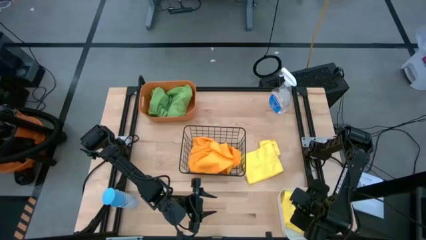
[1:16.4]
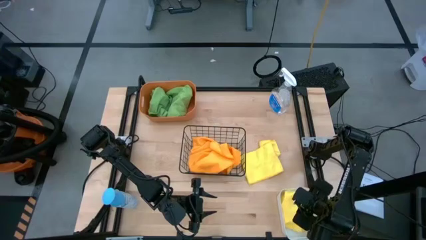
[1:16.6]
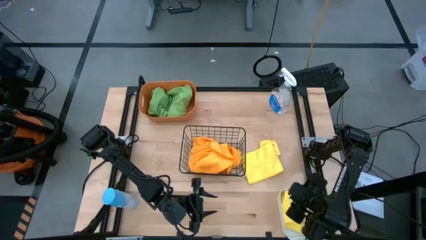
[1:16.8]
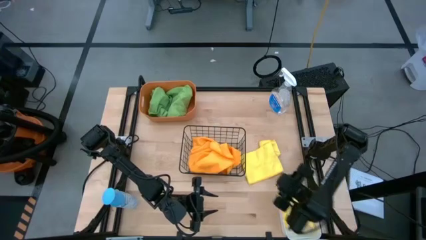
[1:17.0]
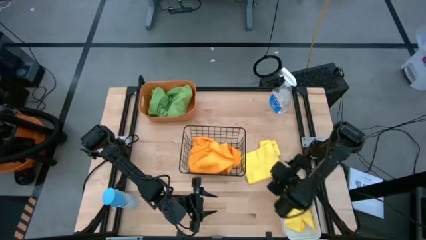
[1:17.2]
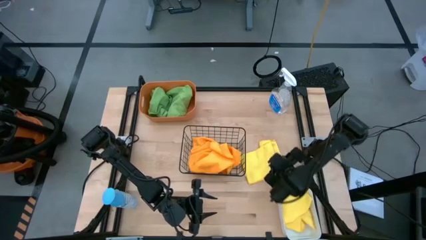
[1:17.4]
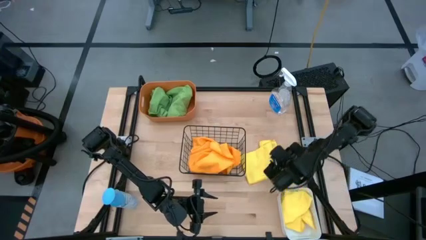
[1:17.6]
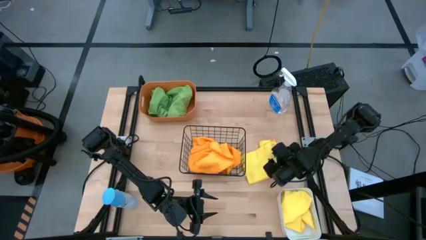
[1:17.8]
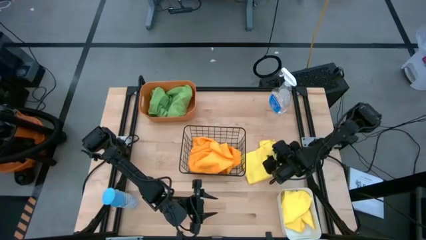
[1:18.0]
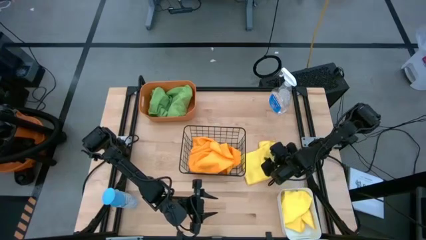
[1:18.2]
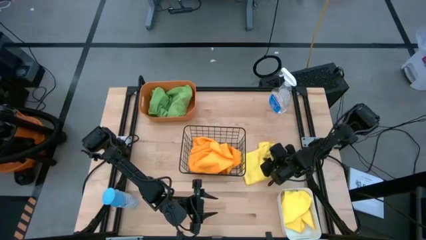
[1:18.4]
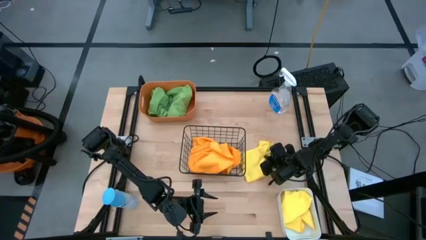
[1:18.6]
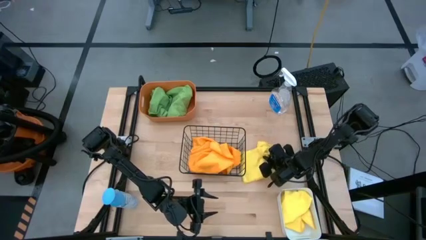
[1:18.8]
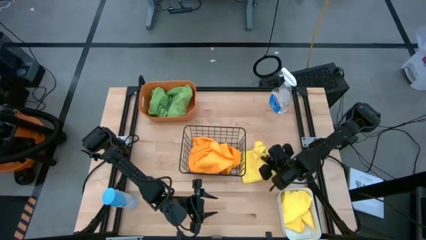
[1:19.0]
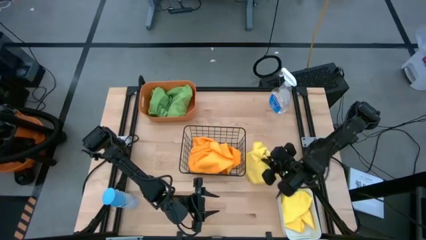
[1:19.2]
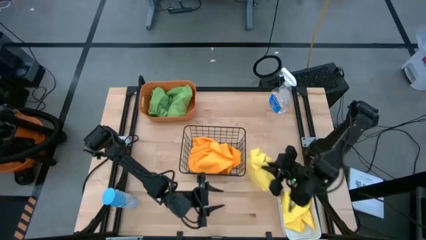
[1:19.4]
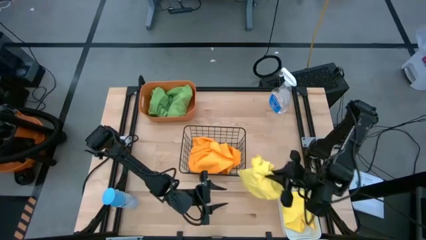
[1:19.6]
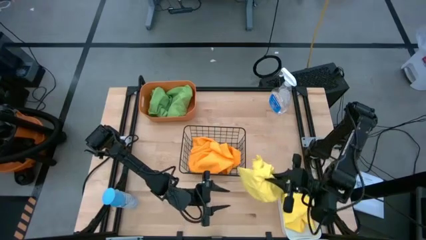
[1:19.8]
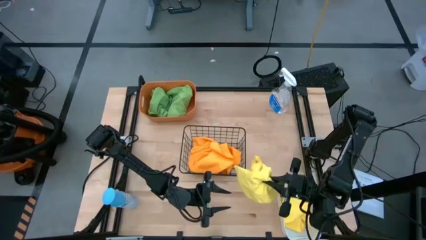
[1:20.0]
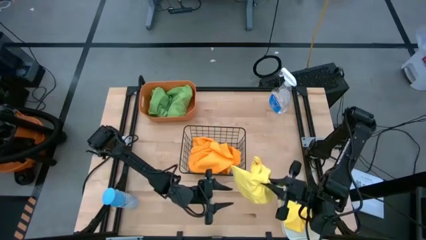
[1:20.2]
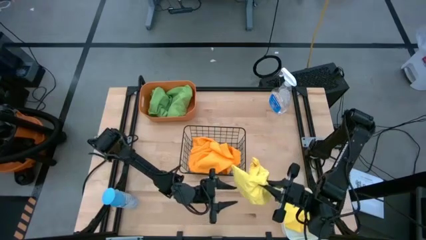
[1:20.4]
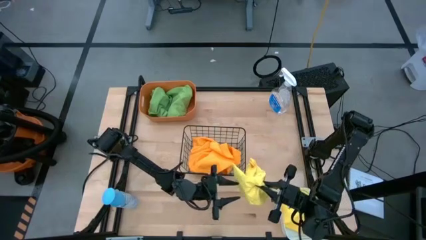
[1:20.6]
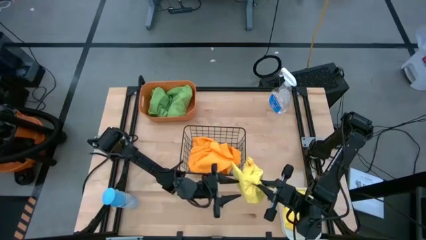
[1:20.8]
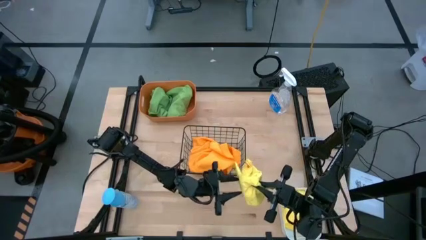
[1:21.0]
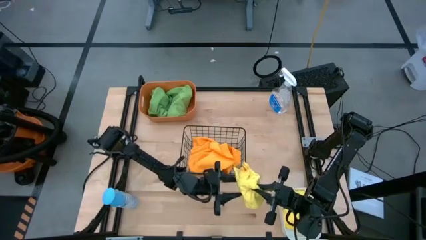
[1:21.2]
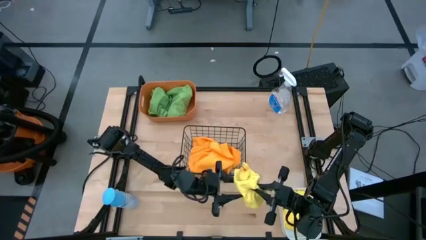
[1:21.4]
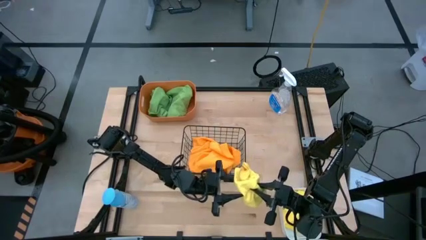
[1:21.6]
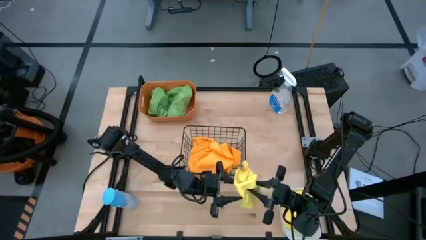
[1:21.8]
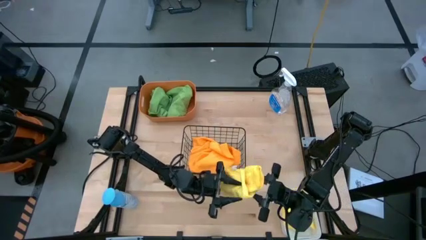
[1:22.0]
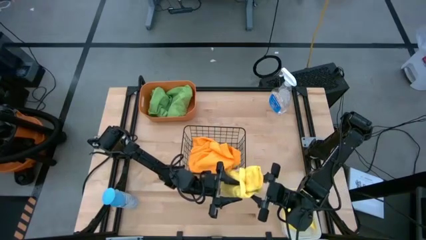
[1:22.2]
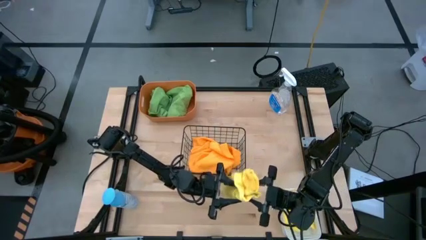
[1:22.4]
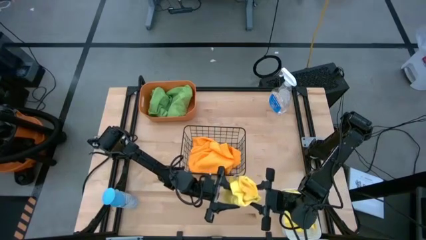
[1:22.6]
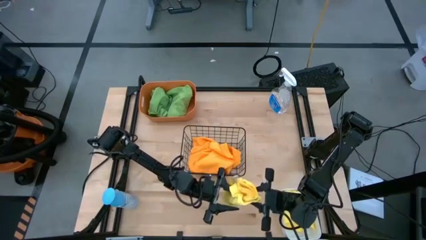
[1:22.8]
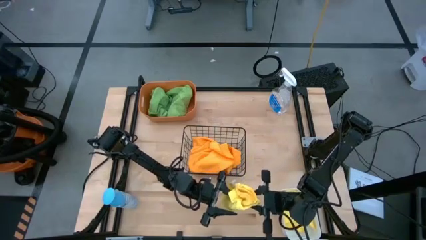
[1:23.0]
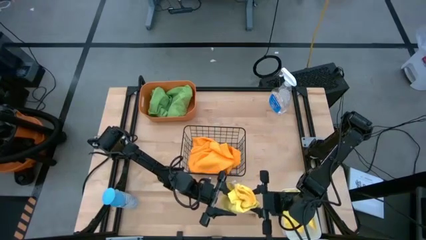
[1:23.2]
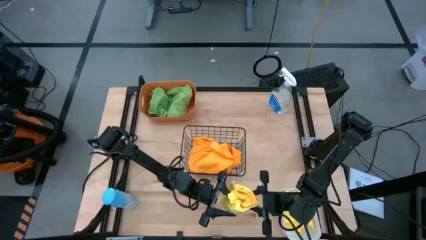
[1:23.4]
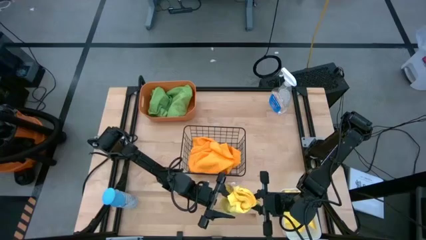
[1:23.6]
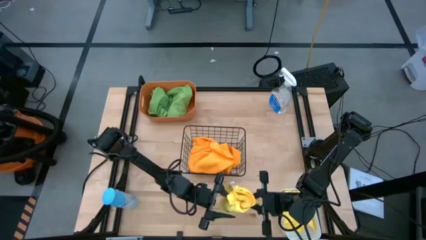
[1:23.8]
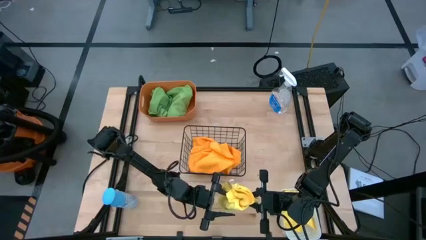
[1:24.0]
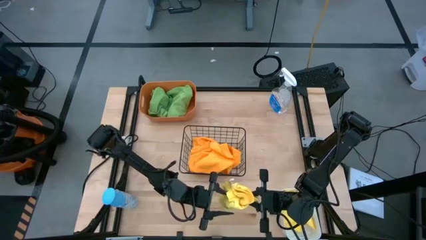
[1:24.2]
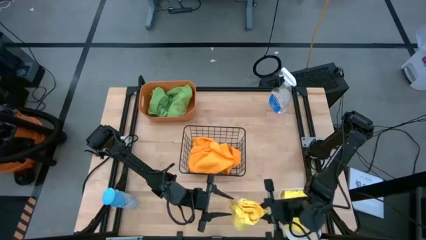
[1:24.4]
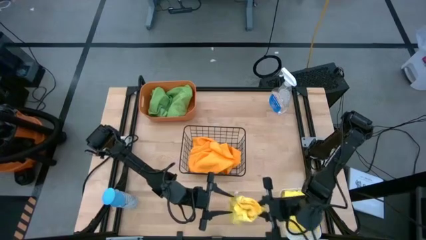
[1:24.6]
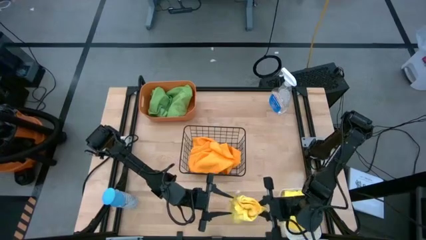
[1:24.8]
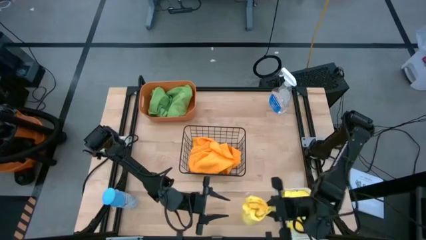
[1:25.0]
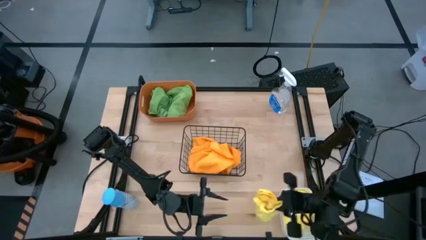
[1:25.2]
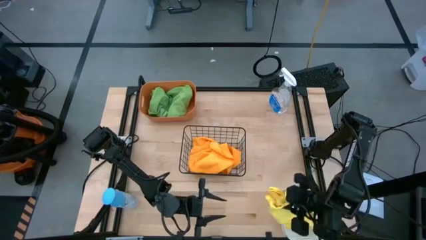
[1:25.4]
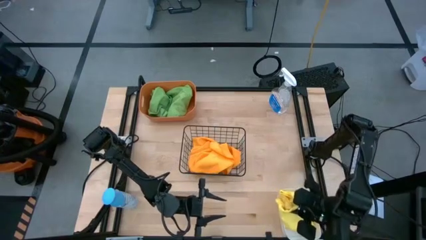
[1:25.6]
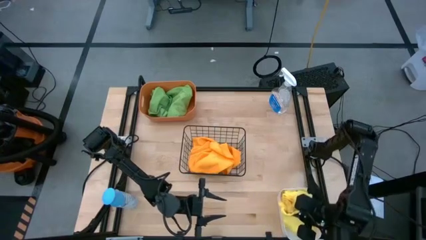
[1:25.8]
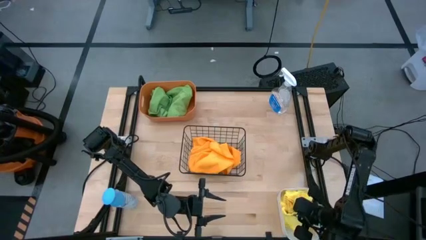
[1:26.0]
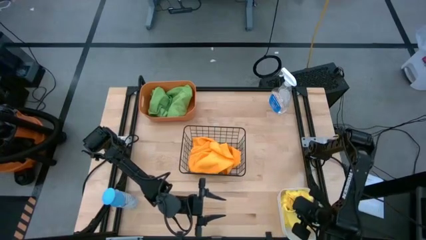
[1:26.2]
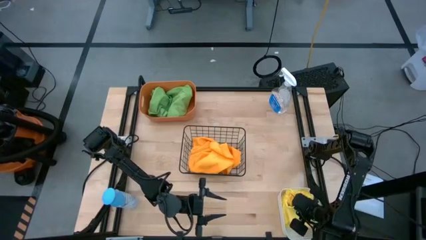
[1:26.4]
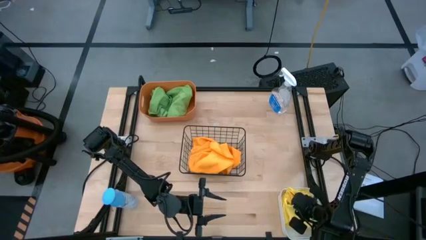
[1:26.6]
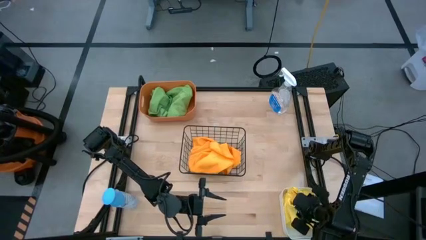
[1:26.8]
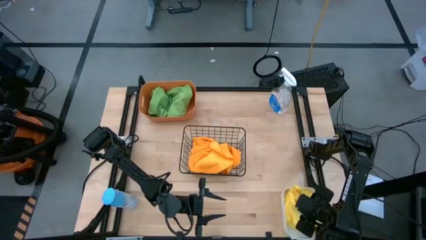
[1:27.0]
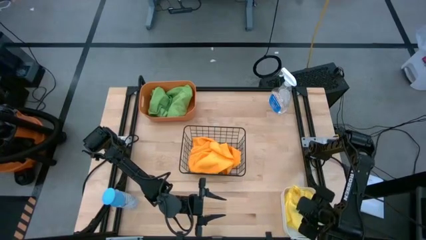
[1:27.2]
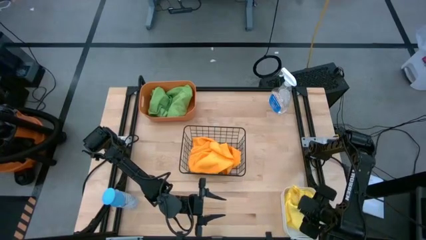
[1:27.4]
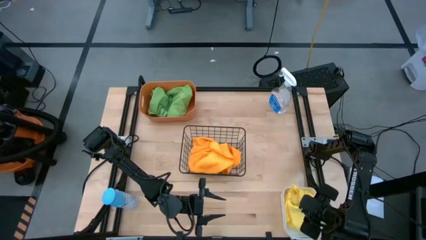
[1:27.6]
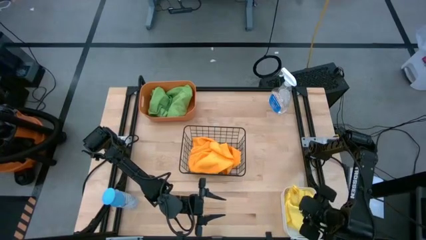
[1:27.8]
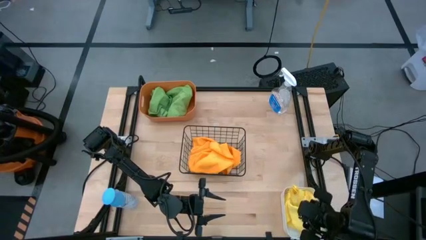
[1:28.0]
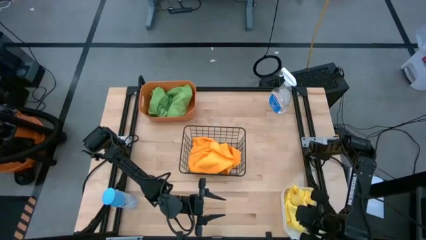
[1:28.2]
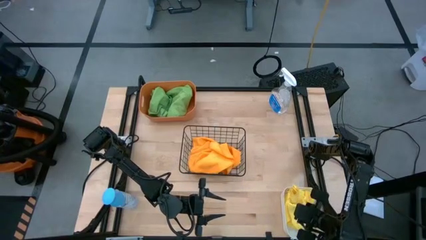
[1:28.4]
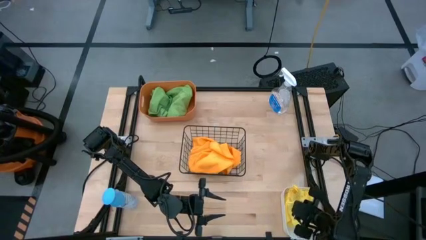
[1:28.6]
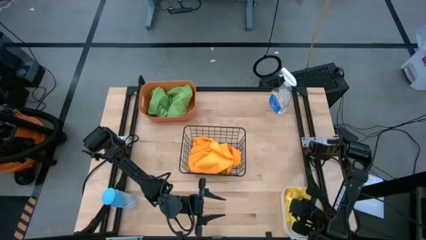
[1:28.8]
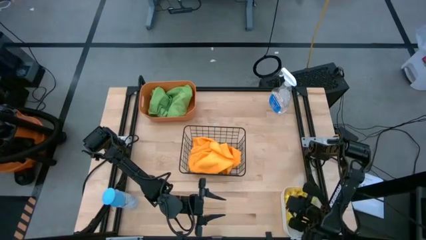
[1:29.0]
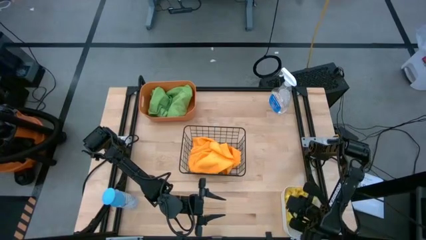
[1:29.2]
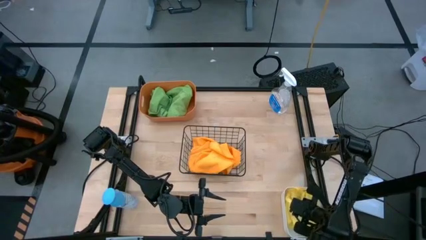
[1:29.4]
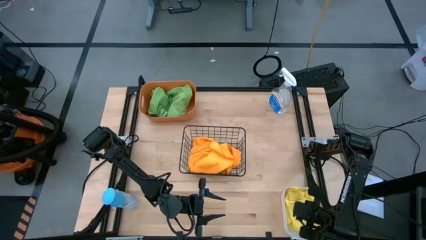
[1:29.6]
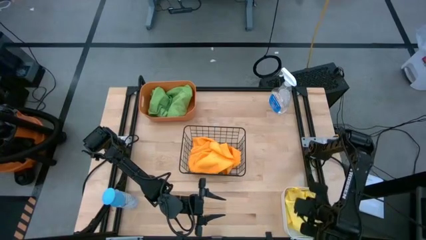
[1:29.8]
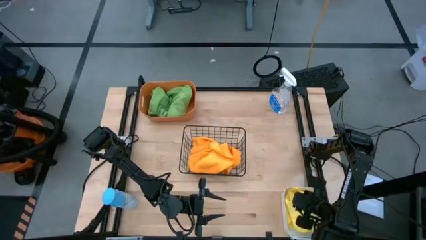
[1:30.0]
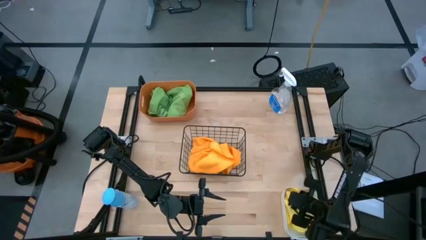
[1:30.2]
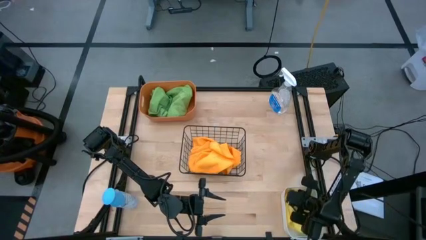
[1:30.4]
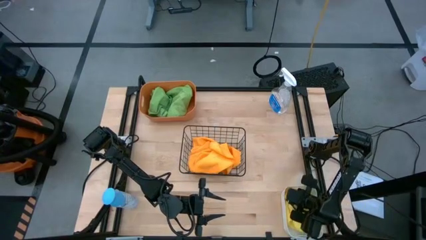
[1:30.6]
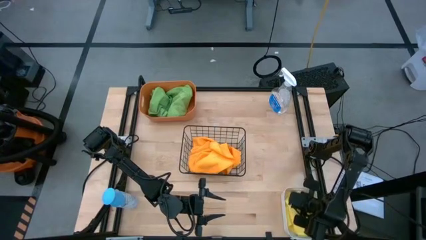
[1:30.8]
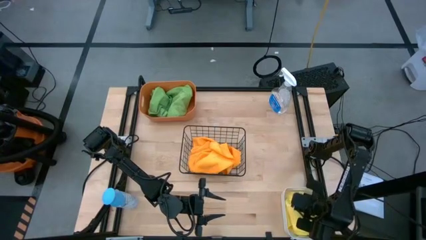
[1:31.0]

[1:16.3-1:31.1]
Task: Sort microfiber towel by color & place in baskets
Put the yellow microfiber cloth into the white bin

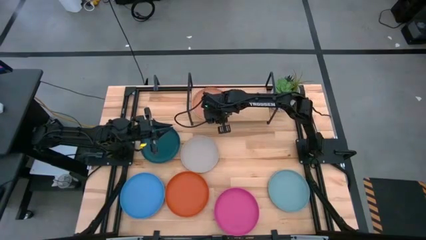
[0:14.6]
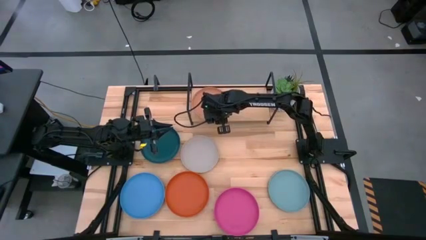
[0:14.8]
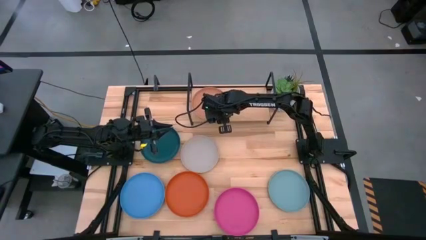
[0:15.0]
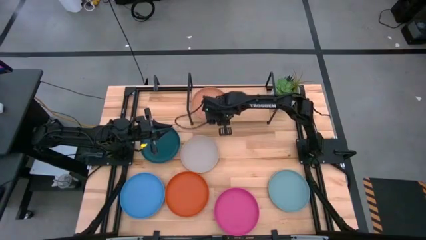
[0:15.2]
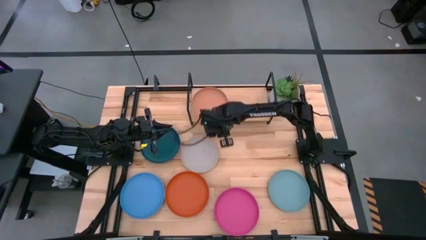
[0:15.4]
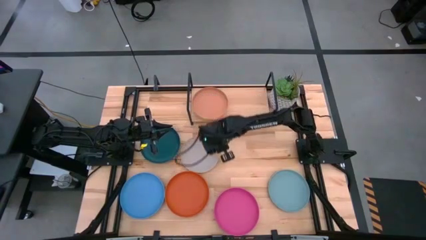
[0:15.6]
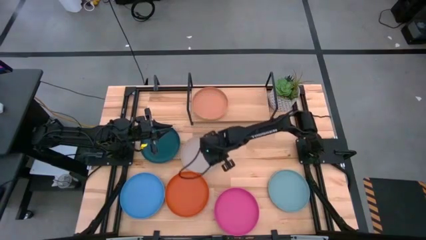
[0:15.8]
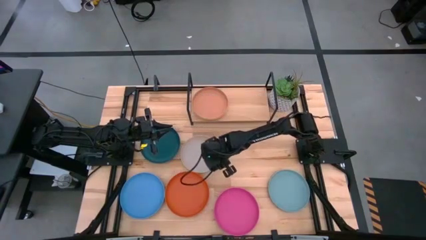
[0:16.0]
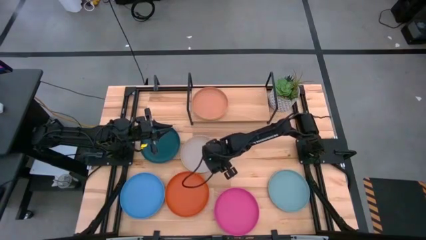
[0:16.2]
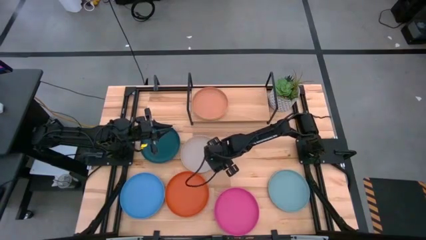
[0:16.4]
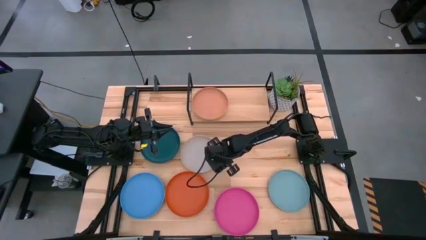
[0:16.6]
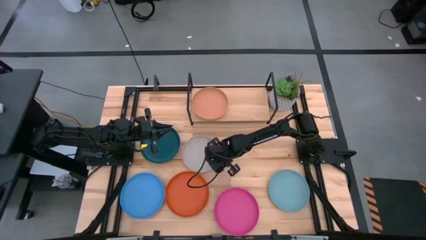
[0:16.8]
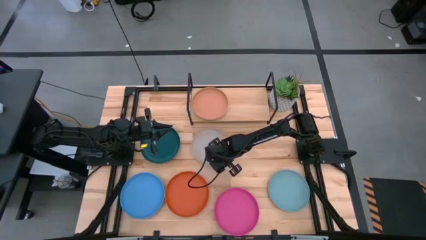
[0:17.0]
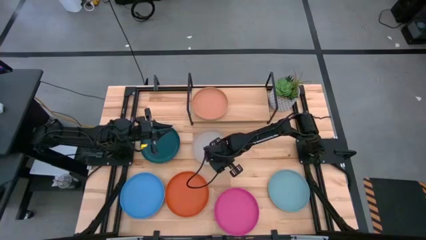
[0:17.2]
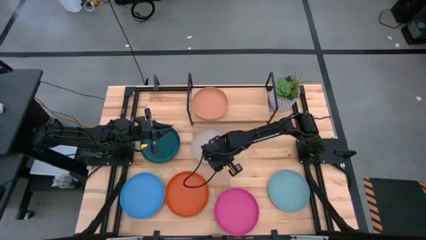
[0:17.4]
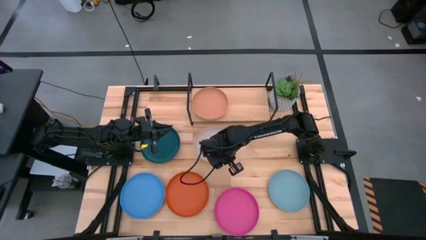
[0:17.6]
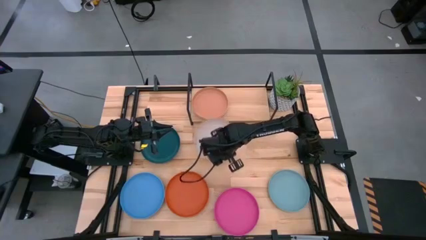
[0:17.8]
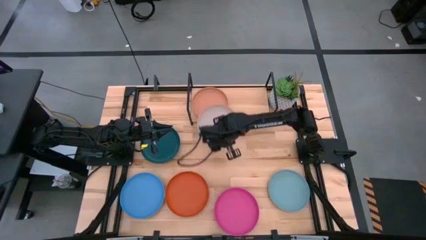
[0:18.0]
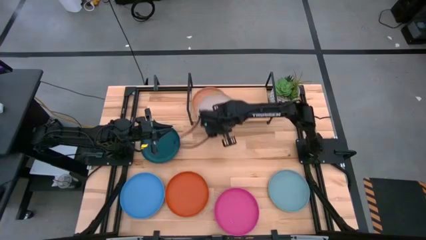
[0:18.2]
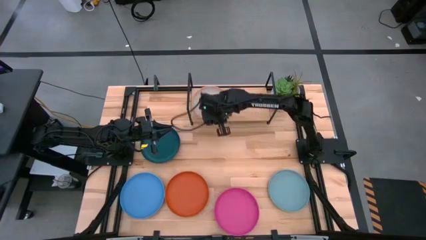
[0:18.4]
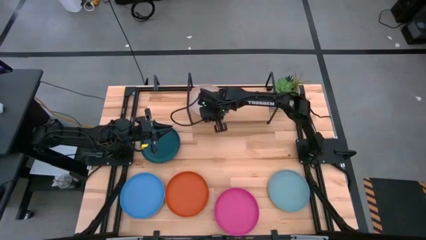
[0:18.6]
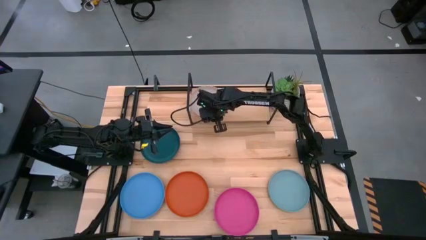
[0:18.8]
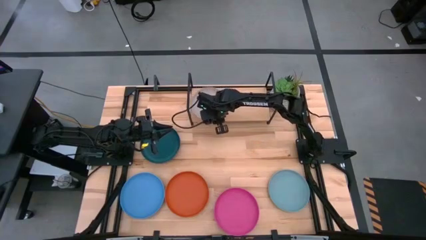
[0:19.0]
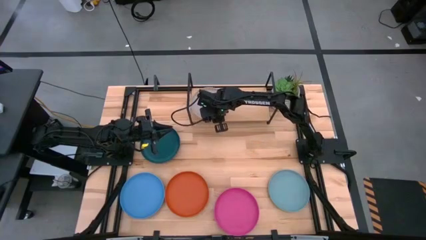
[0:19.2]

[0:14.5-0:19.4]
Task: Place and stack plates onto a shelf
Stack the gray plate on top of the brown plate on the shelf
